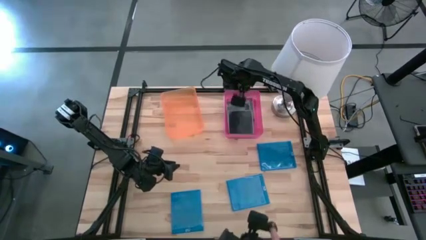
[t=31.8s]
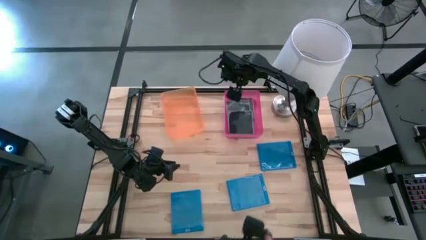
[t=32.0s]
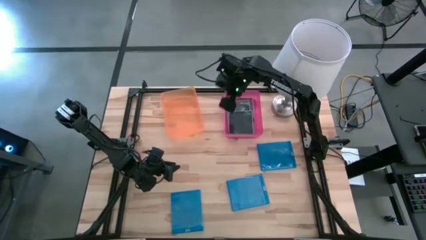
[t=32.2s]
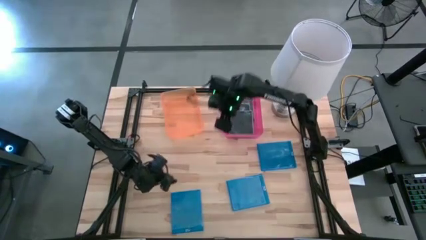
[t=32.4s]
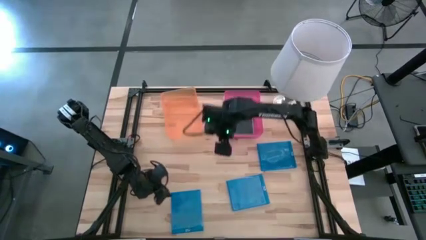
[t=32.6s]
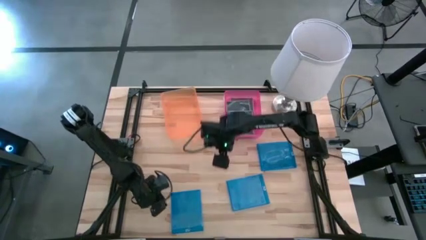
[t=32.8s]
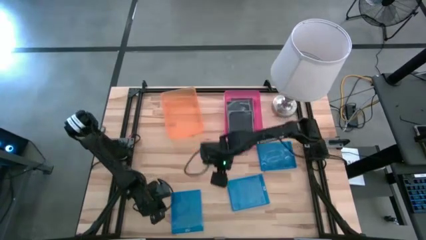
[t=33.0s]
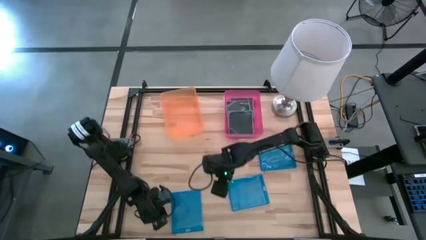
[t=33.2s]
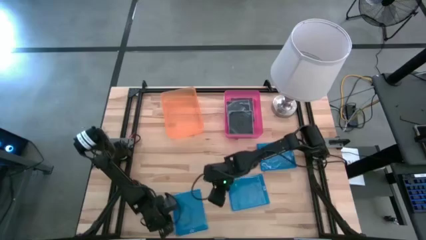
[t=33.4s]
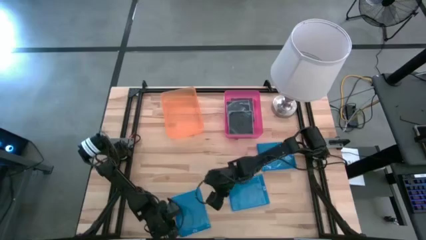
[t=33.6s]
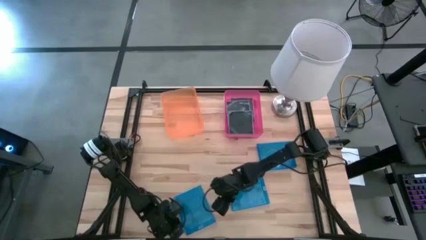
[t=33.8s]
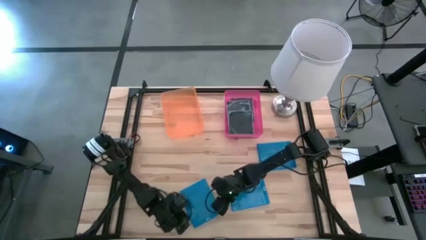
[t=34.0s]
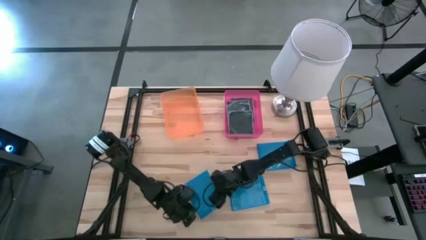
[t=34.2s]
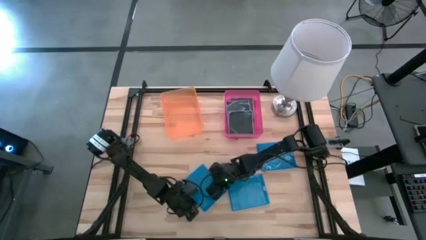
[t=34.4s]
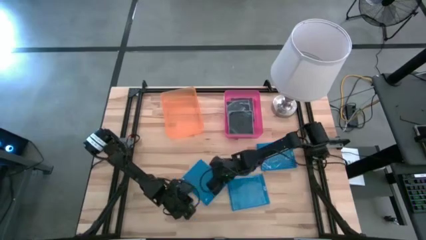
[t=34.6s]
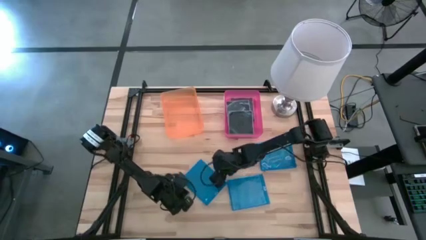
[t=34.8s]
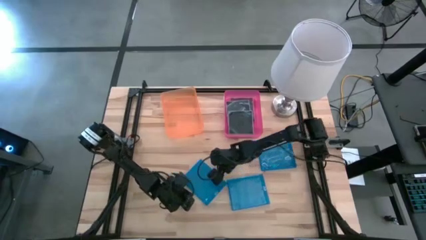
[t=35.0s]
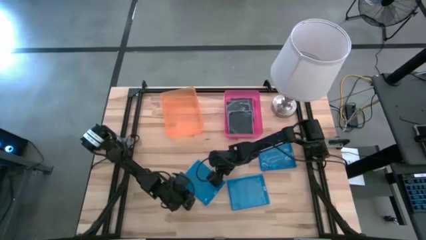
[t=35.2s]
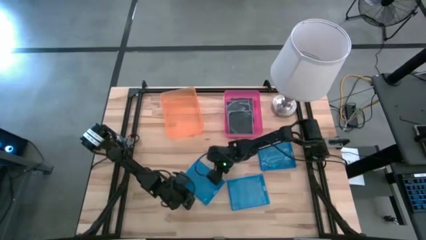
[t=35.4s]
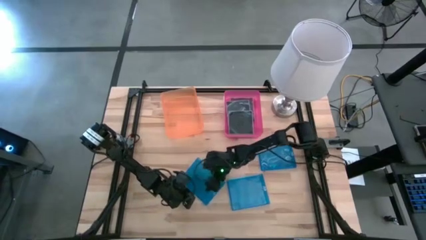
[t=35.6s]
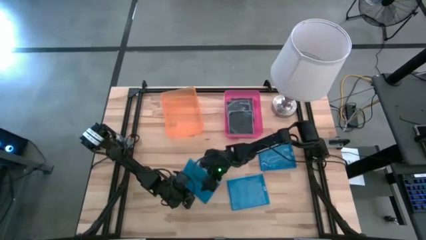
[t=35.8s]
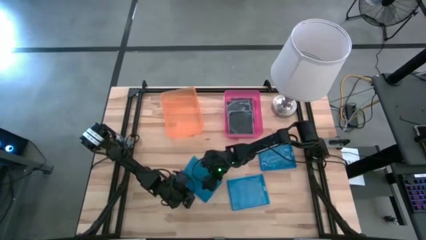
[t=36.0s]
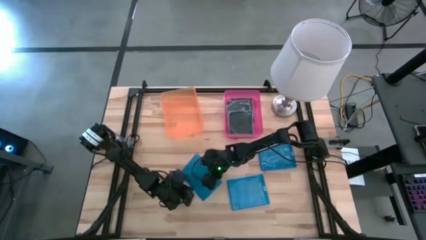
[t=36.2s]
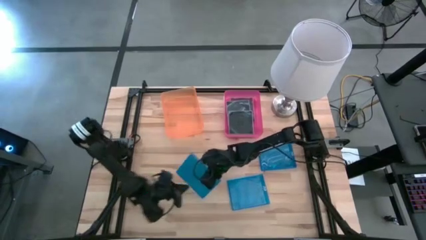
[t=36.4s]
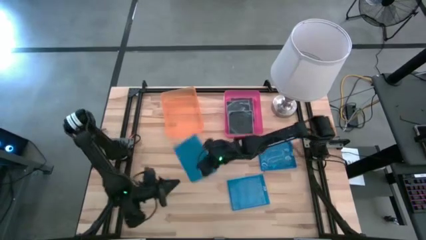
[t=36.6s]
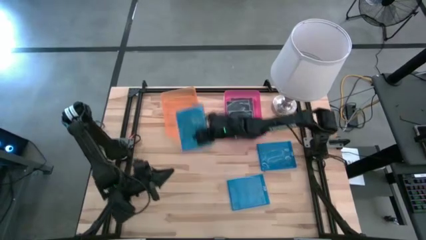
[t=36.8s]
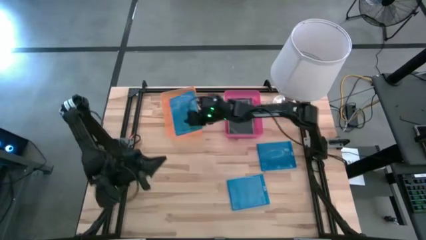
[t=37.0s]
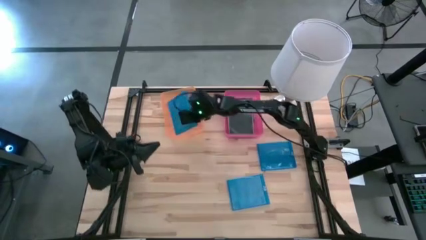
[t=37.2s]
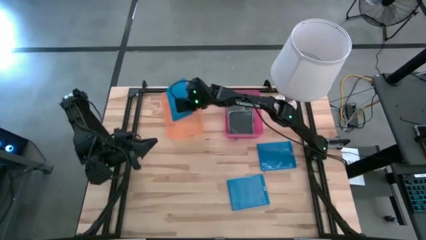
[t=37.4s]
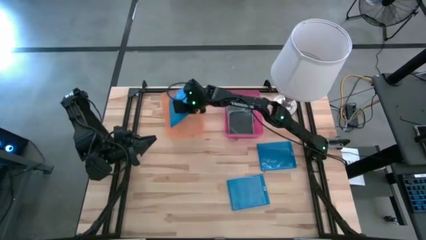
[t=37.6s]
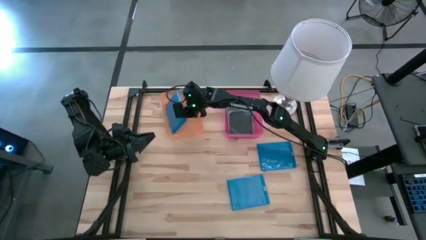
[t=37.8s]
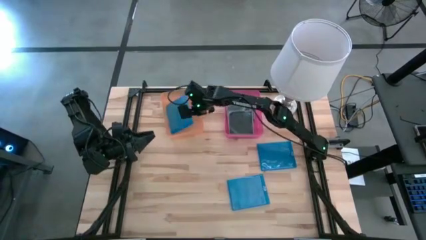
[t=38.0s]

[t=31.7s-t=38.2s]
Task: Pick & place jewel cases by type
Put the bottom left blue CD case into the orange bin

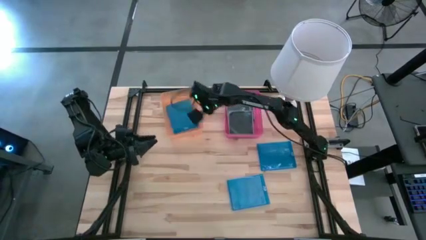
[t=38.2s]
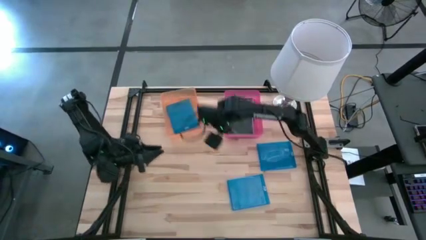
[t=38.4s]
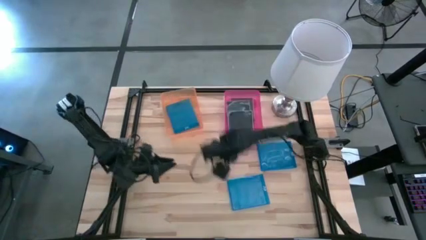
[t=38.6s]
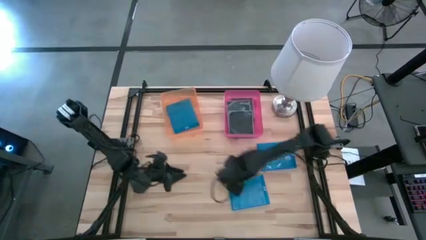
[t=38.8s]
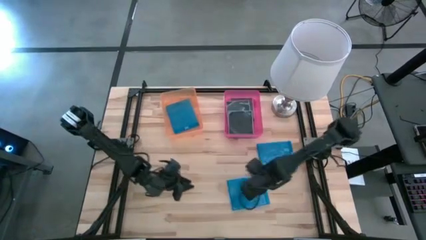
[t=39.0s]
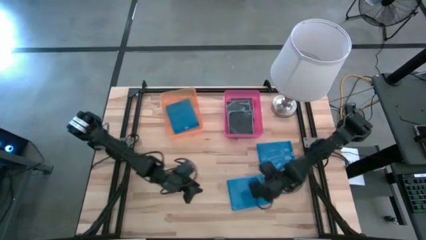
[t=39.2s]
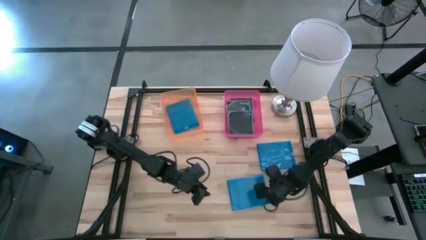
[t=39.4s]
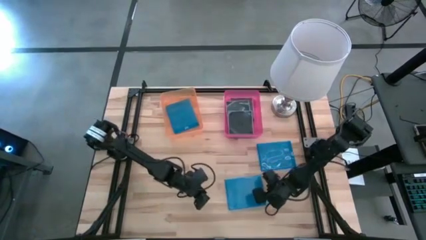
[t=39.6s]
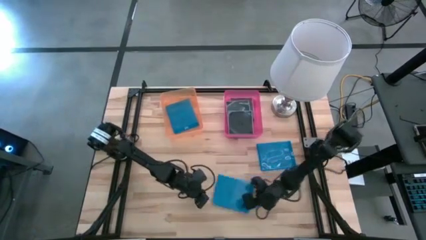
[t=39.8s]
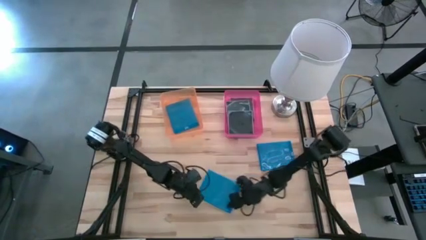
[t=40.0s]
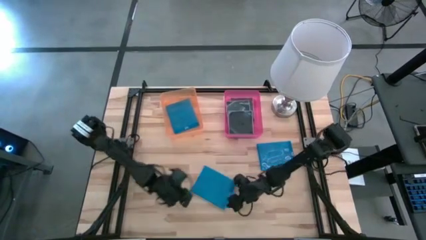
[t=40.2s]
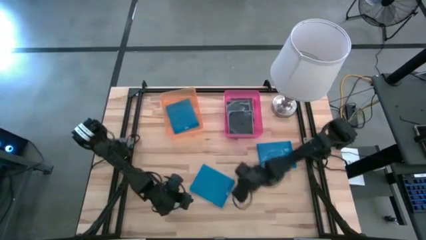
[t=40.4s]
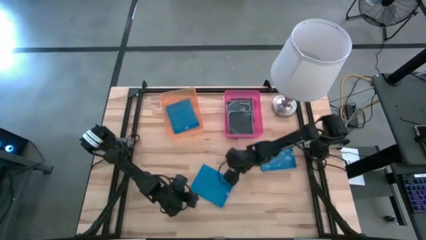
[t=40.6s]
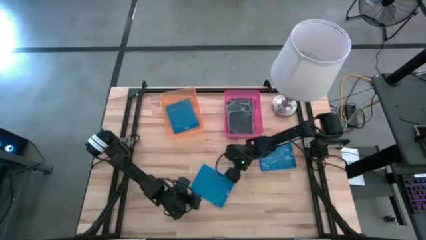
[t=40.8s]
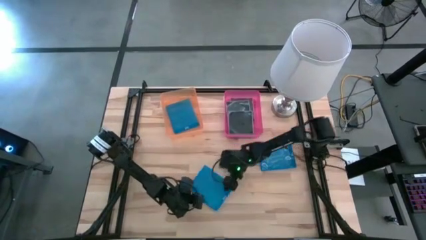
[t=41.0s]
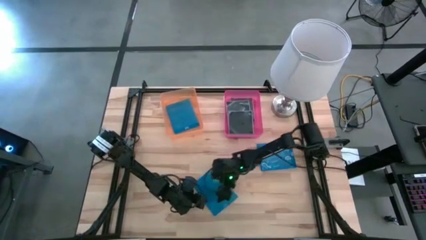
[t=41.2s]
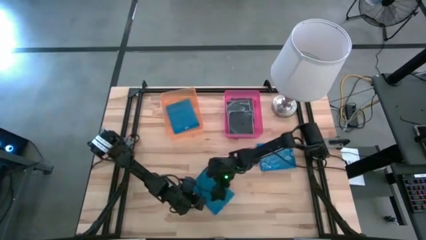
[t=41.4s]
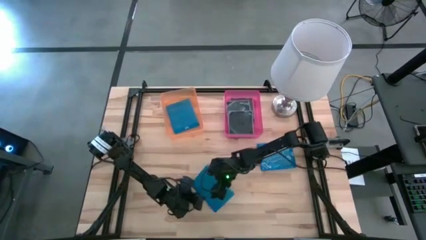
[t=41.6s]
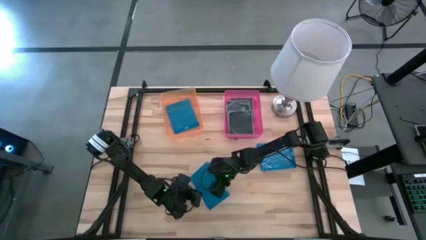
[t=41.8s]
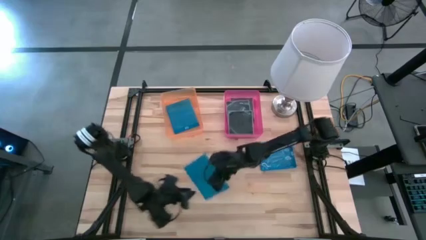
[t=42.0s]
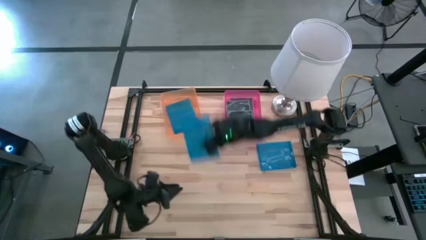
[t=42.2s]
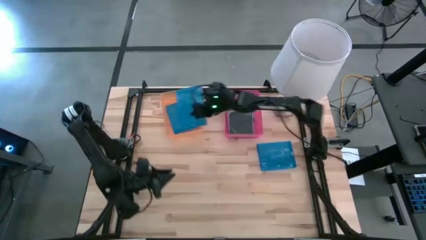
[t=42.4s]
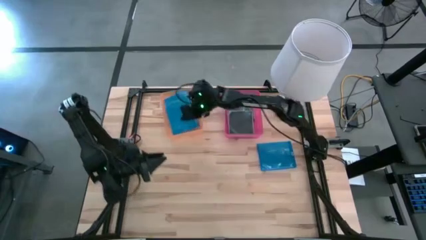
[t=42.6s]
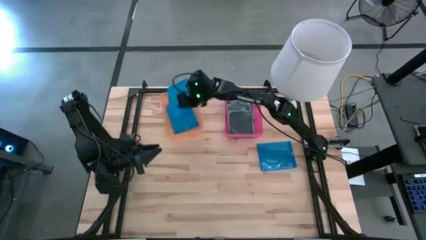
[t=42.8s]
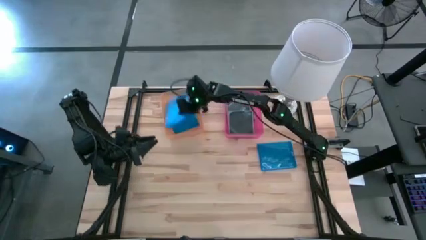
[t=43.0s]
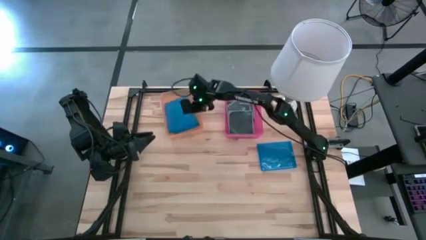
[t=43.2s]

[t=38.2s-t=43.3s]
Put the bottom blue CD case into the orange bin
